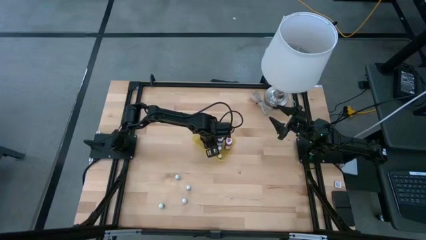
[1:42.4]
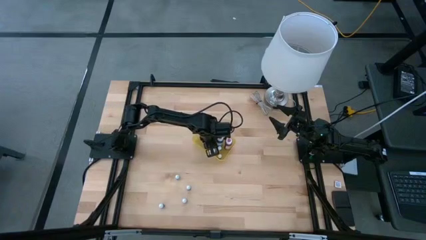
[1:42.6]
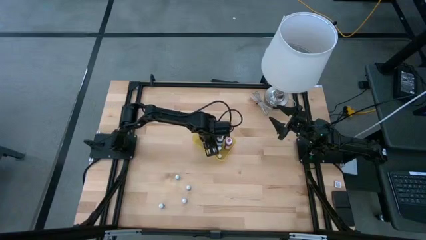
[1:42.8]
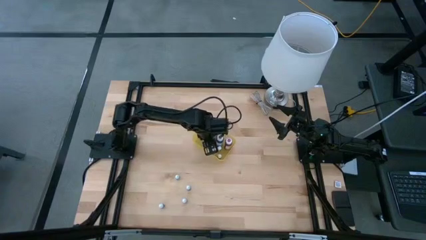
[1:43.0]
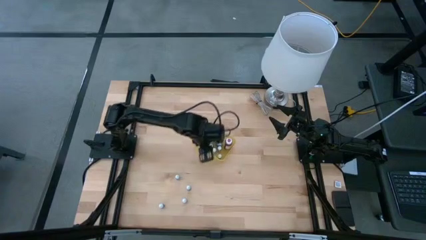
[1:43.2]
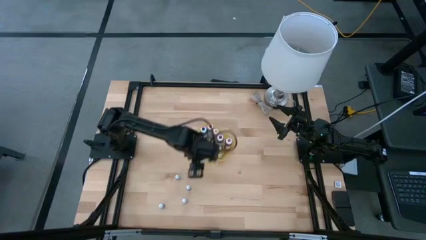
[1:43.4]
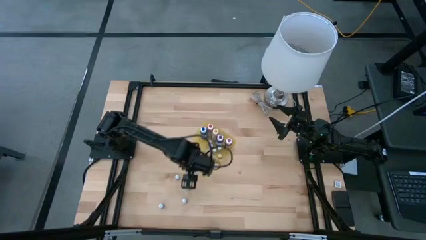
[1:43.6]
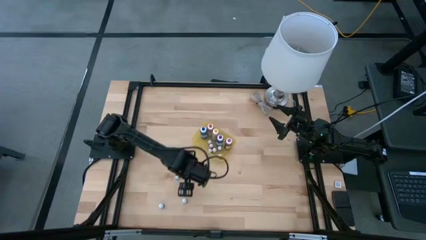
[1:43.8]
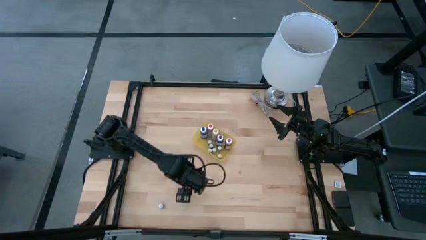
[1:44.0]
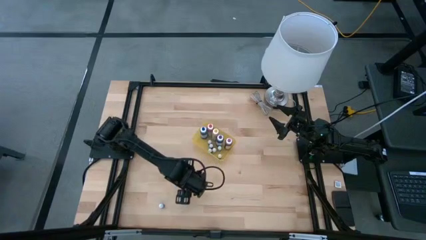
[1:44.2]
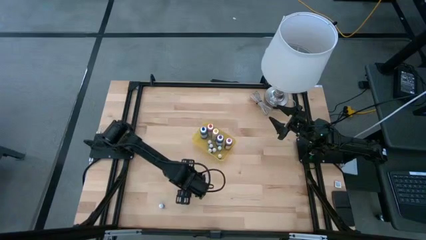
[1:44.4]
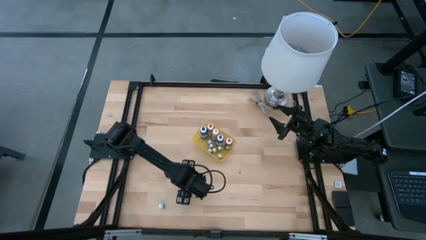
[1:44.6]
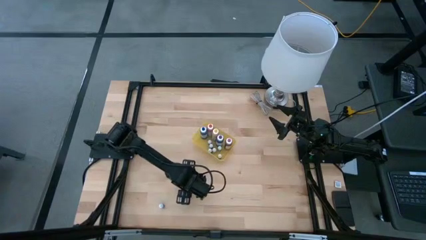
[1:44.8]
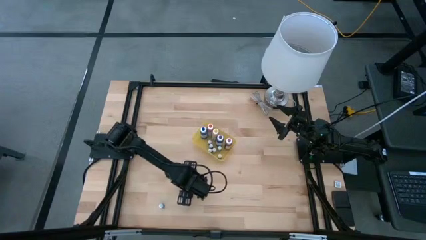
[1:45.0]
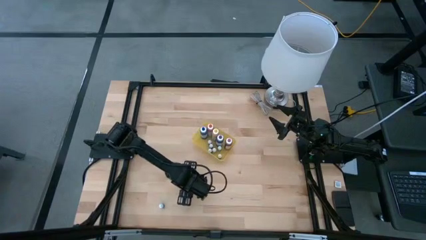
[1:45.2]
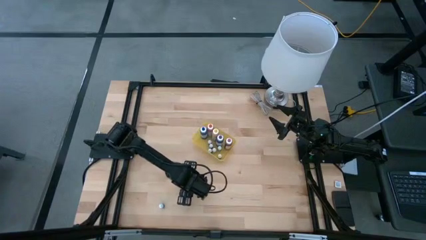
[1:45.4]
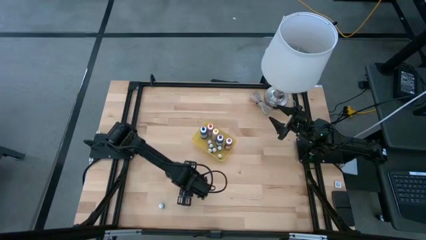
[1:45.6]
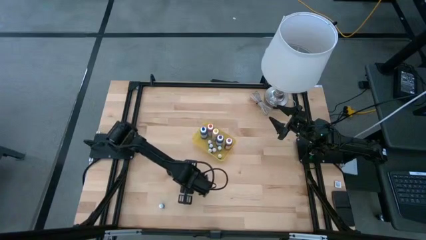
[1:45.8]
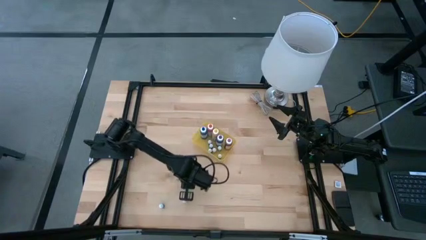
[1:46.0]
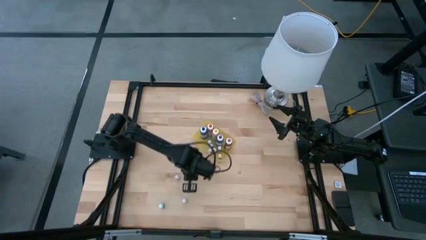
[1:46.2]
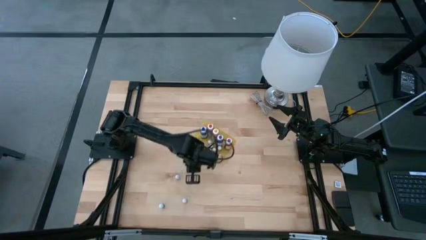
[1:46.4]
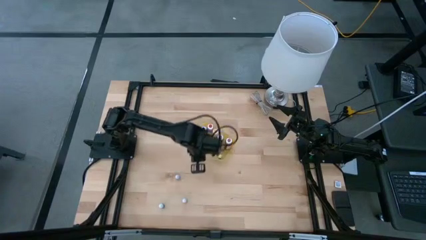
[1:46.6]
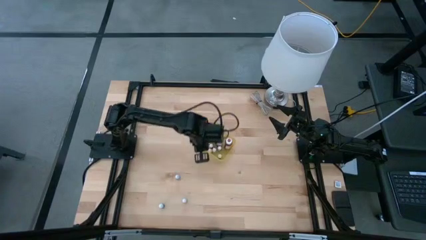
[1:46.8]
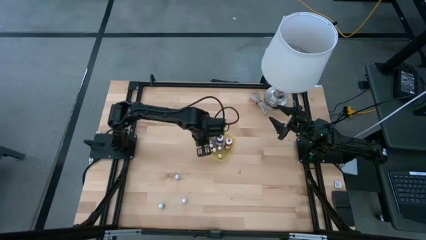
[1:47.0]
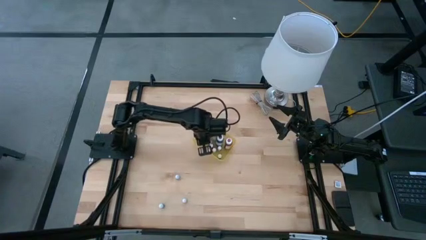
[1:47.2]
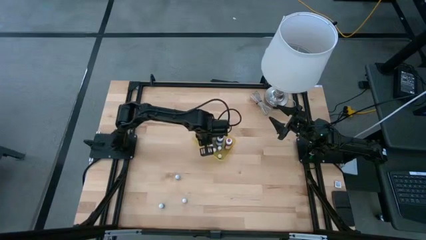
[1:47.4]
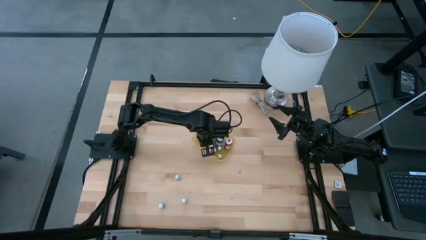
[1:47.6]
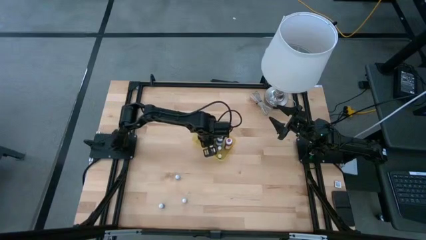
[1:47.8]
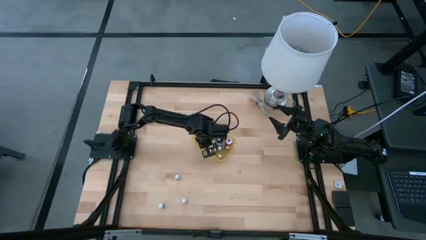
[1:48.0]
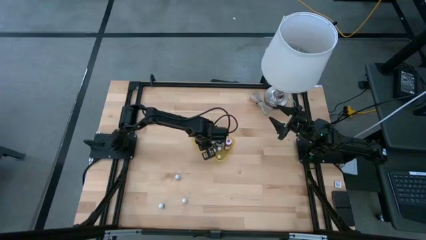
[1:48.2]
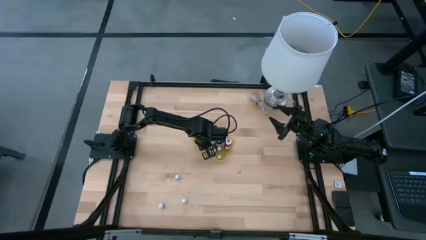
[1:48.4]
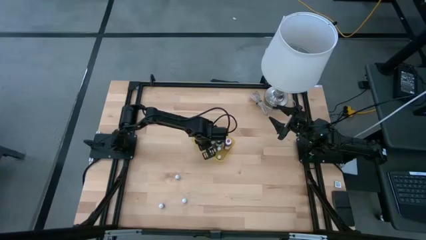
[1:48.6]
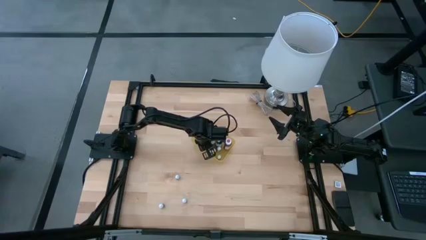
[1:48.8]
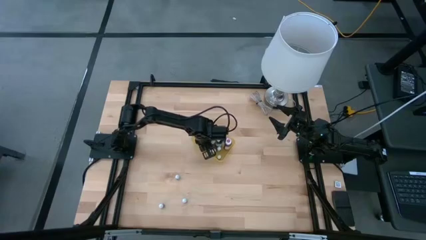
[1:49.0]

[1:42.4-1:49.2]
Task: Pick & Place food coloring
Put the small blue food coloring bottle into the yellow bin

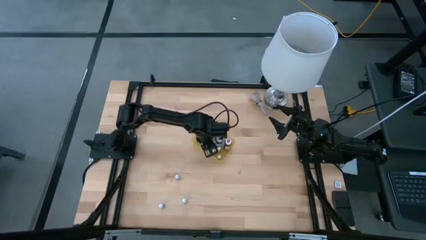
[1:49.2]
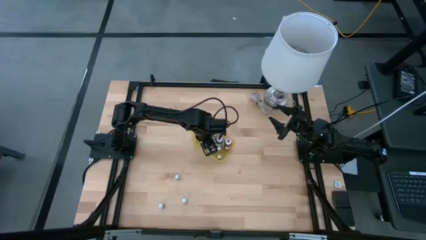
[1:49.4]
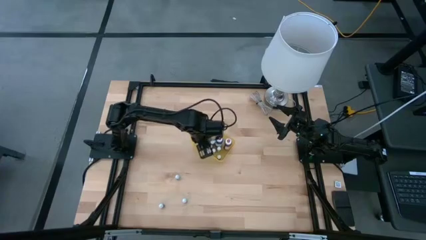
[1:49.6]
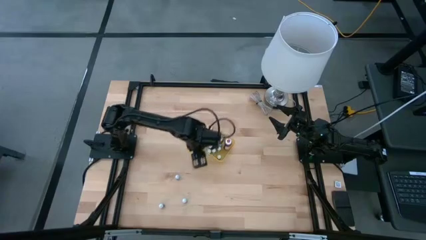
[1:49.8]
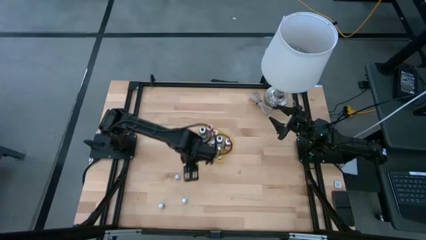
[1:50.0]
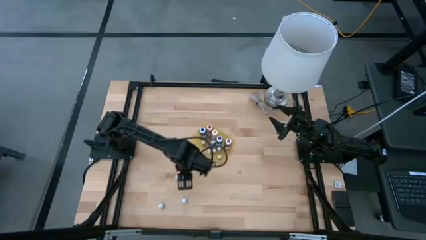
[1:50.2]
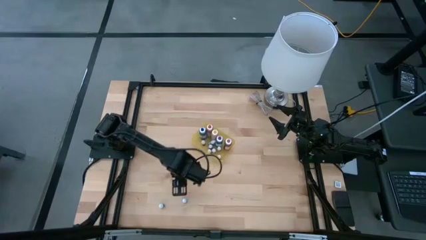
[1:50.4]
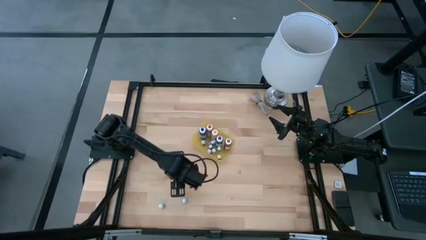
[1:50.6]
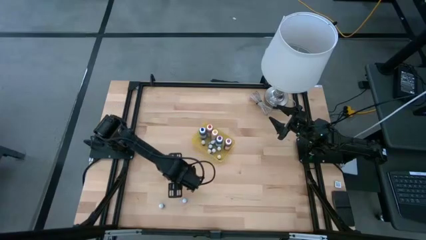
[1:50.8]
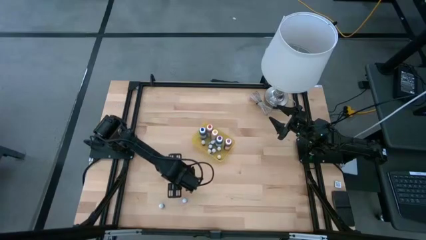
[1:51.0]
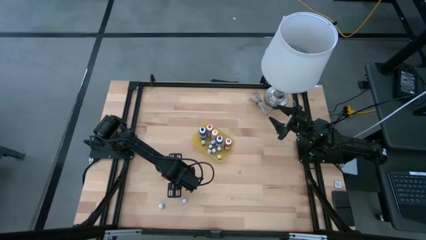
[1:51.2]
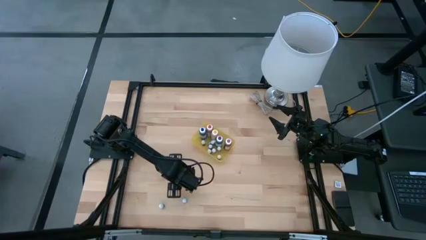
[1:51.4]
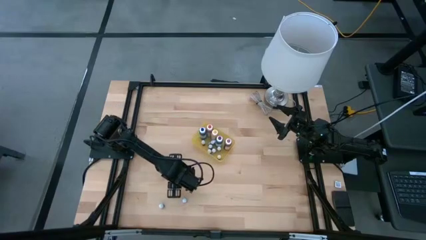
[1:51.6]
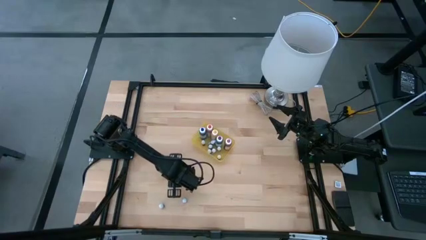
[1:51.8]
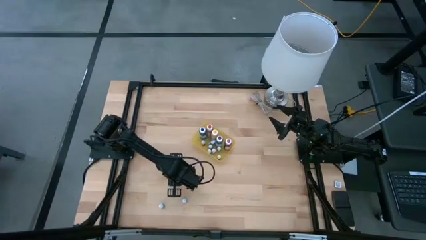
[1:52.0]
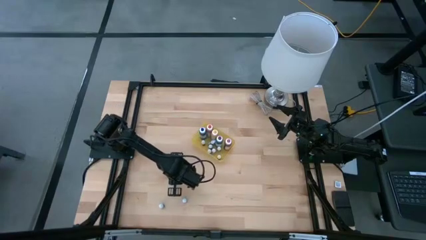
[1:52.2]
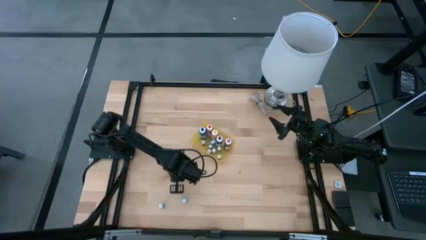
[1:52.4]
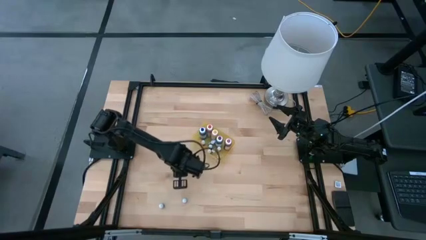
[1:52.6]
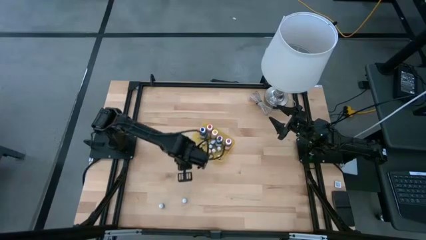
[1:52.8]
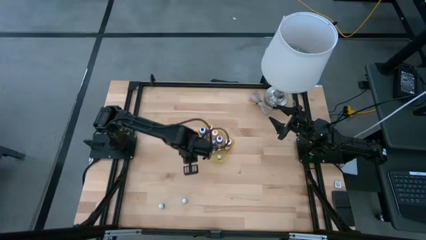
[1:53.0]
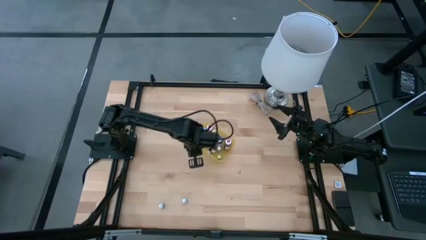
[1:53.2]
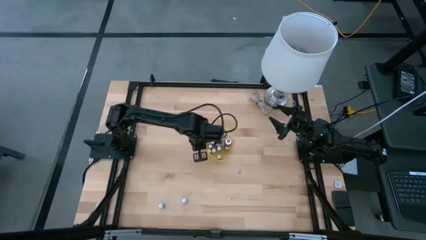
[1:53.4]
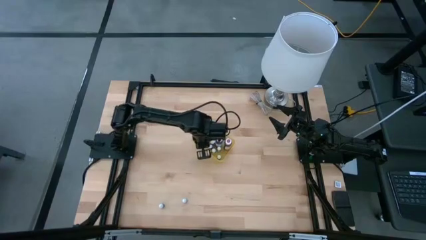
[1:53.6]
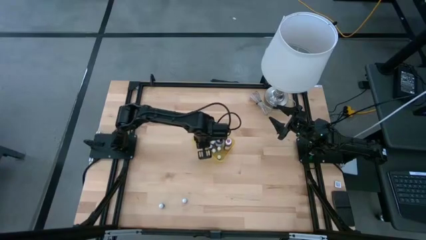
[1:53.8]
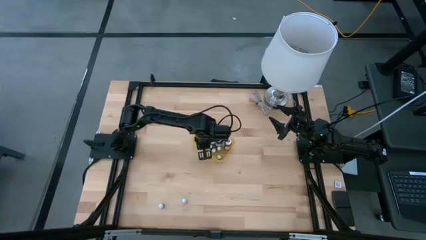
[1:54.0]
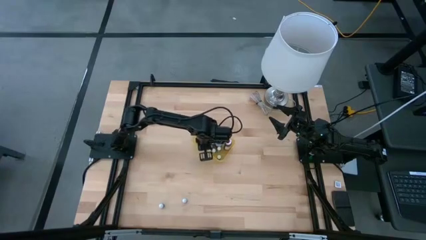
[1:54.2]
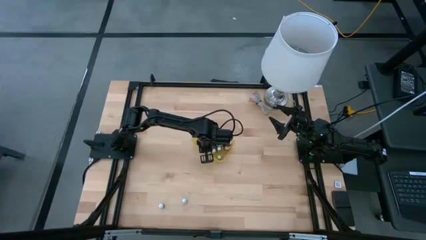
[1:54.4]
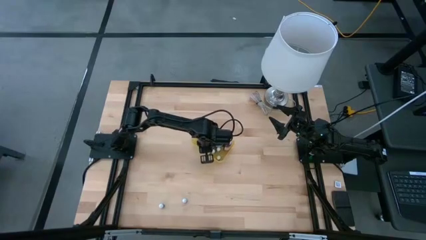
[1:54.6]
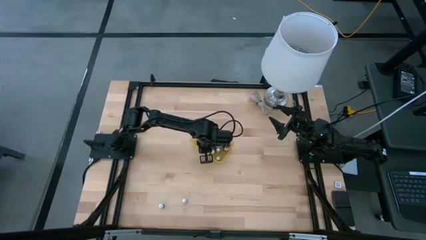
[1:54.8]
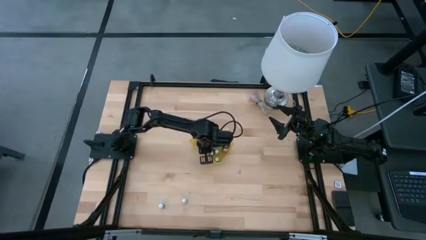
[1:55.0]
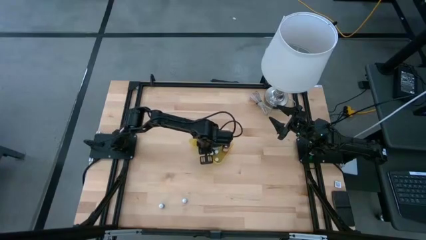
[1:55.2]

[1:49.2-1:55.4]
Put the small purple food coloring bottle into the yellow bin
